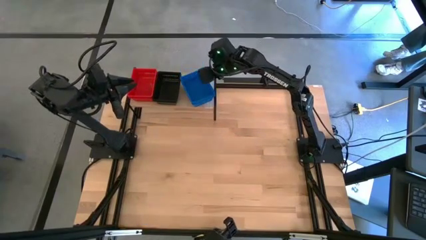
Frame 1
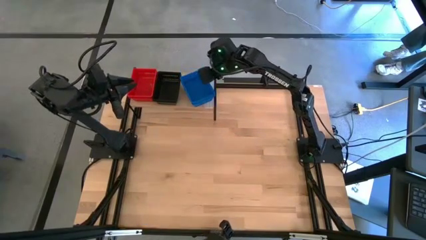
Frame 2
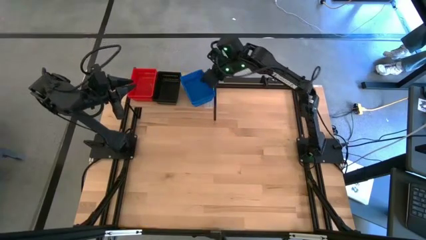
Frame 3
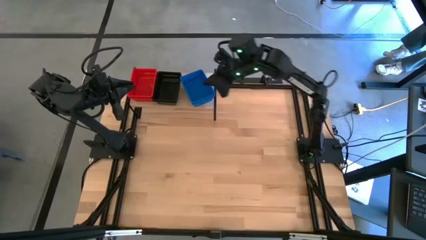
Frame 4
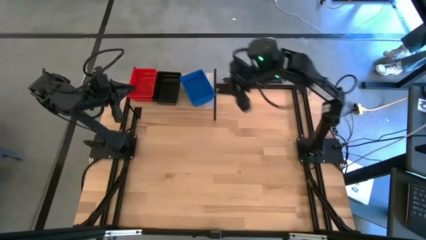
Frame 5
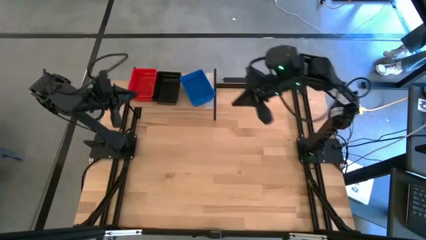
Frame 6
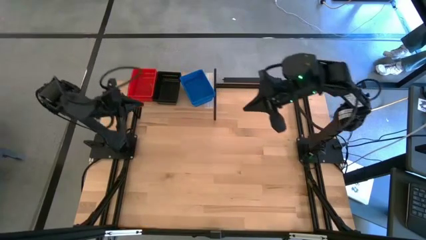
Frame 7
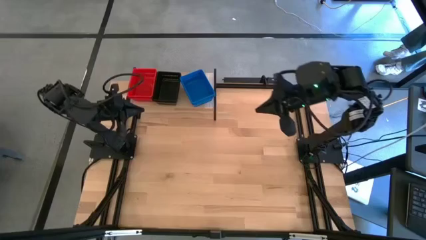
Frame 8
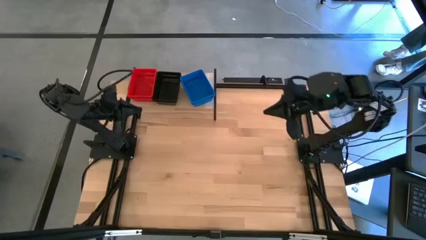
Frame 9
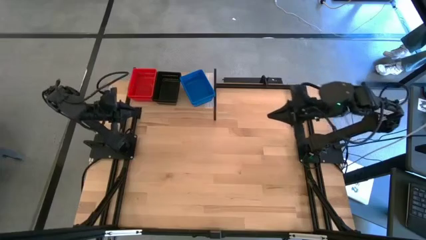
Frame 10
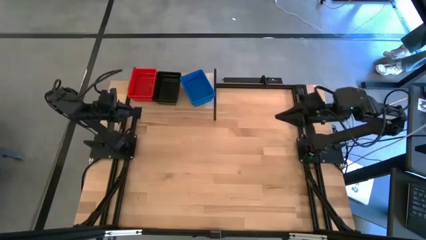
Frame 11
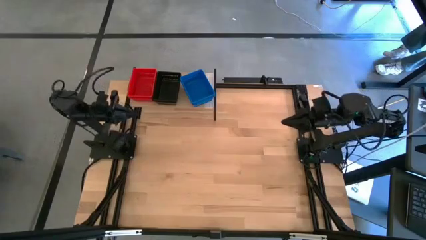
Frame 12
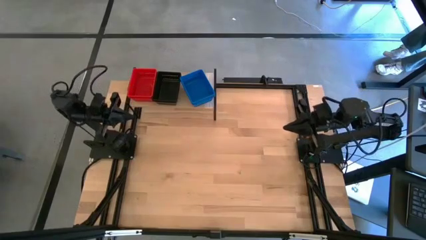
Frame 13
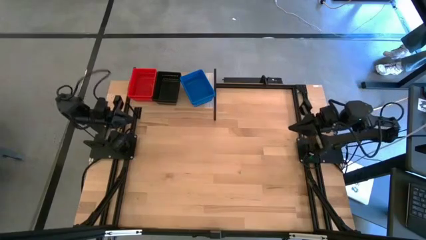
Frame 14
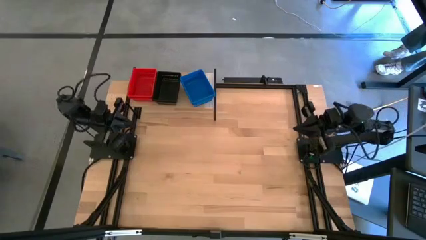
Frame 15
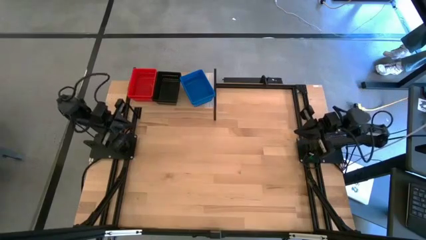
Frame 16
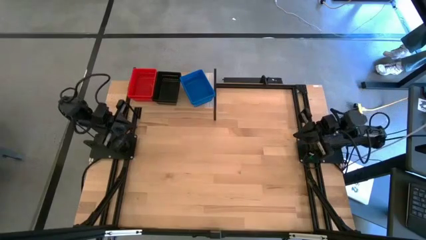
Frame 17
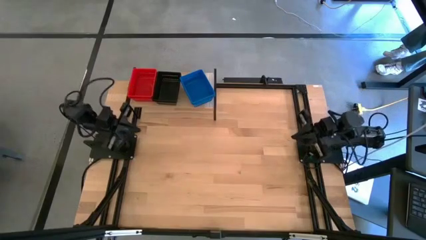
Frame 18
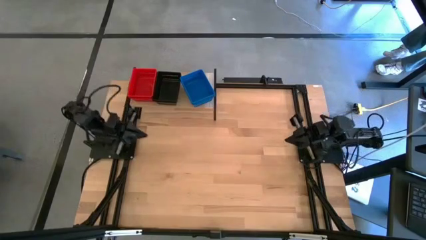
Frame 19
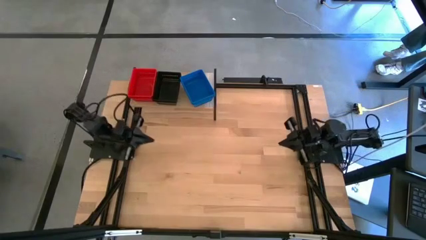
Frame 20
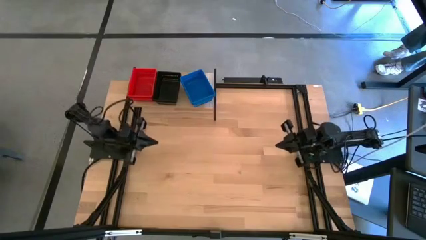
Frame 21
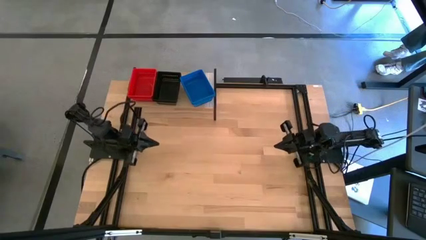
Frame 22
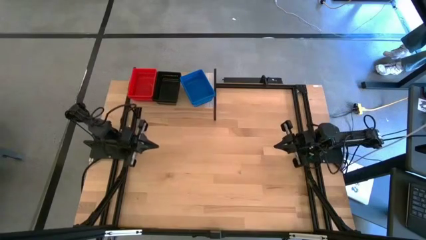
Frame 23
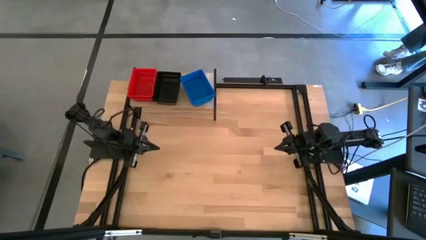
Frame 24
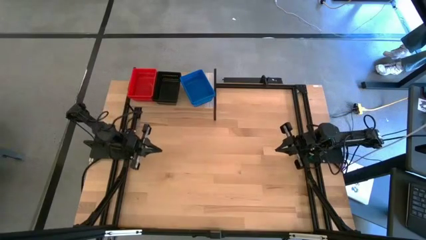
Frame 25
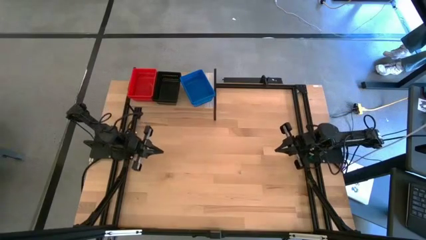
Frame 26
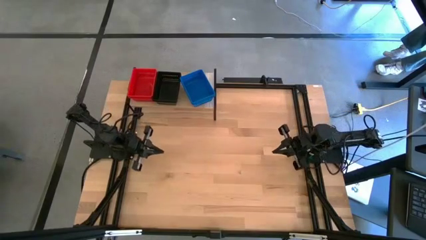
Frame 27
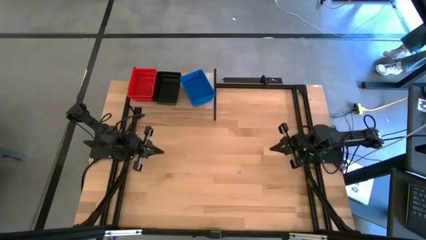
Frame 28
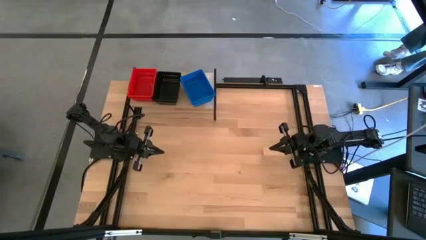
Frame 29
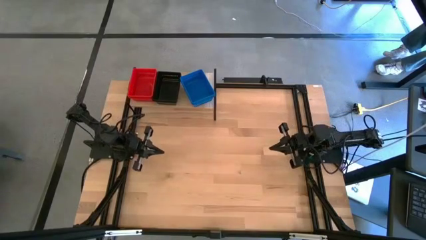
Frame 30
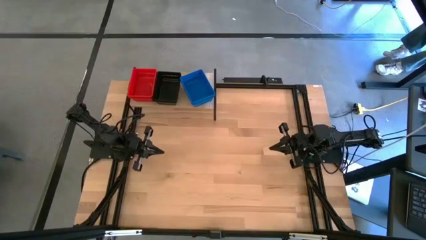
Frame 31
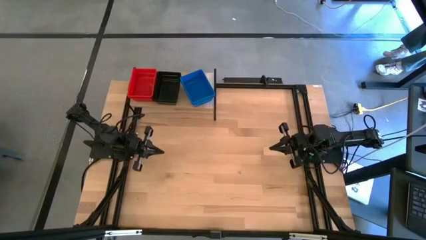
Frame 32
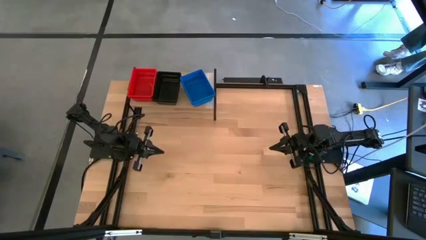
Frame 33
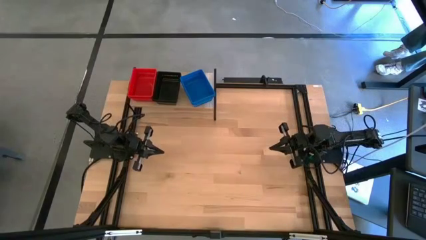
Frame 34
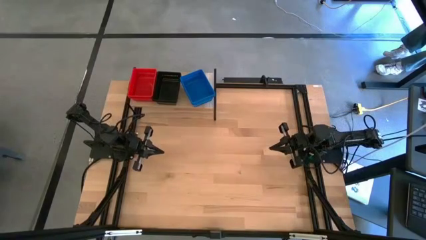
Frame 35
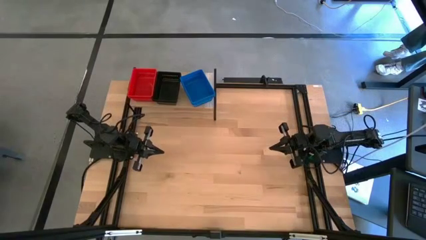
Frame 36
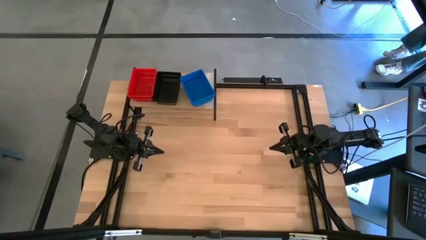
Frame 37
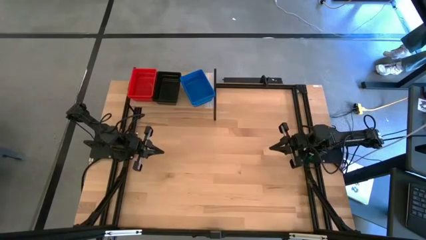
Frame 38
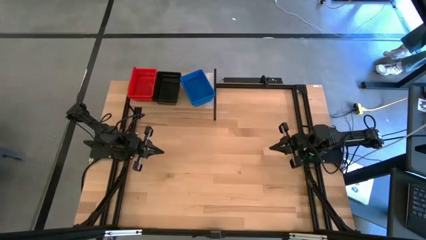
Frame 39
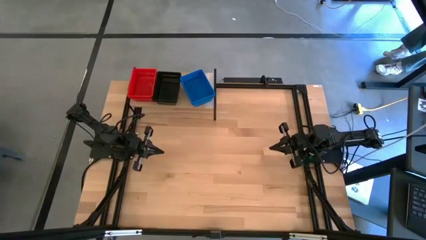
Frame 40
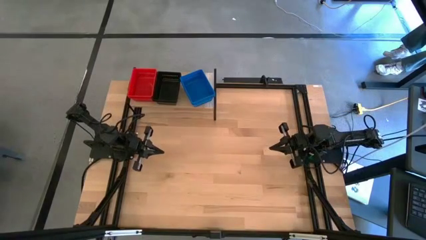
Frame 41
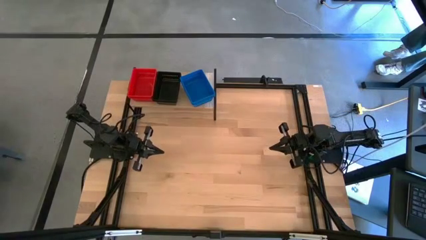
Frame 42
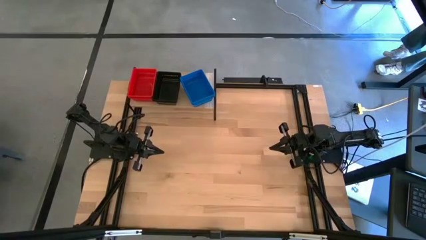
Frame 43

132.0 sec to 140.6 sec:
Task: Stack baskets on shelf by color
Return to Home Position

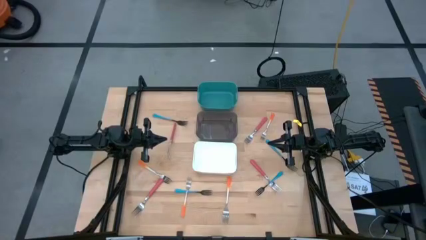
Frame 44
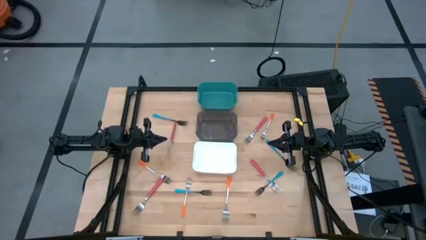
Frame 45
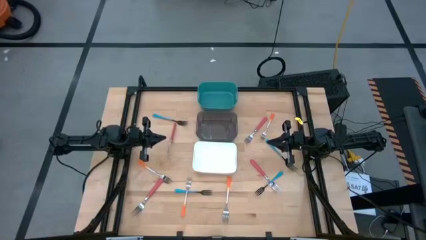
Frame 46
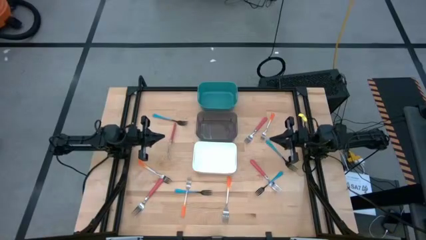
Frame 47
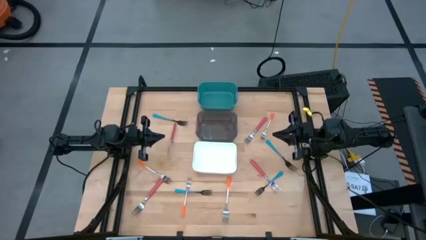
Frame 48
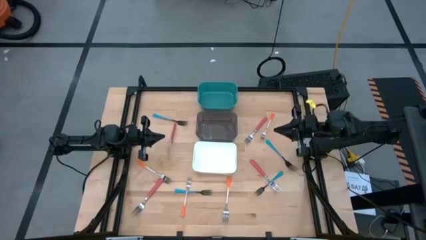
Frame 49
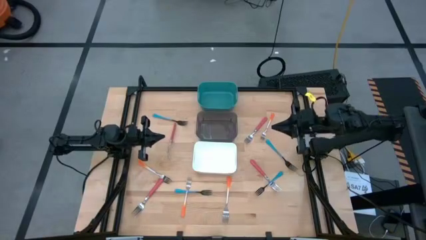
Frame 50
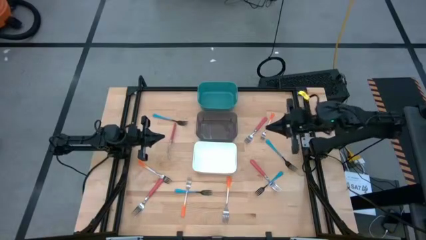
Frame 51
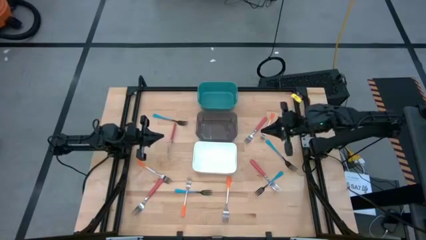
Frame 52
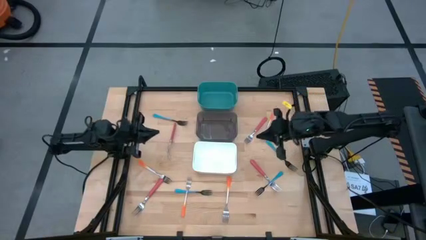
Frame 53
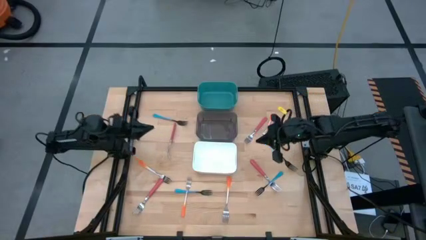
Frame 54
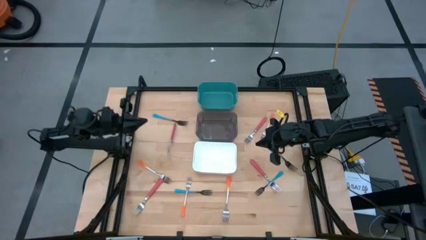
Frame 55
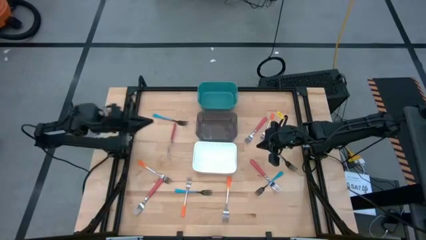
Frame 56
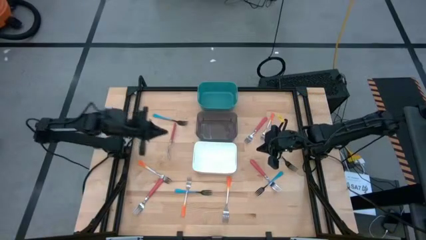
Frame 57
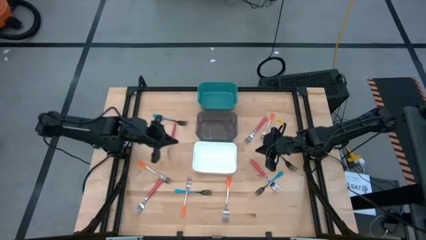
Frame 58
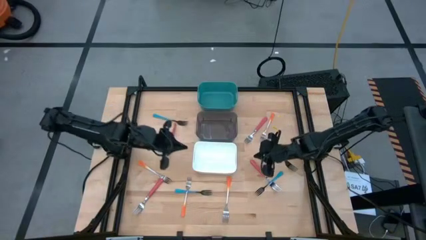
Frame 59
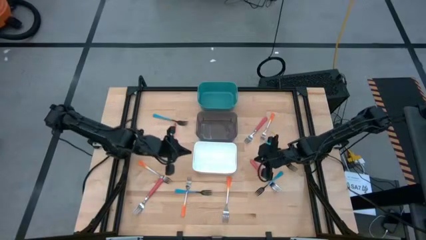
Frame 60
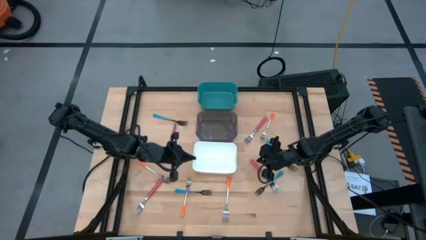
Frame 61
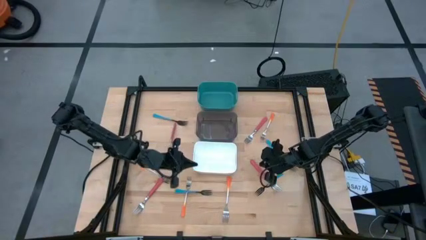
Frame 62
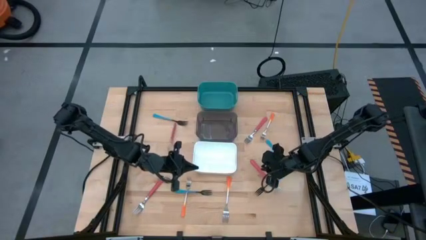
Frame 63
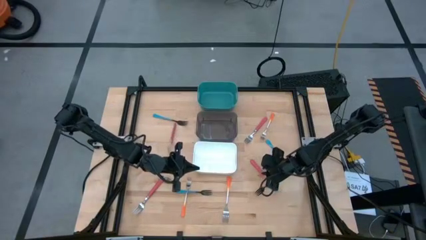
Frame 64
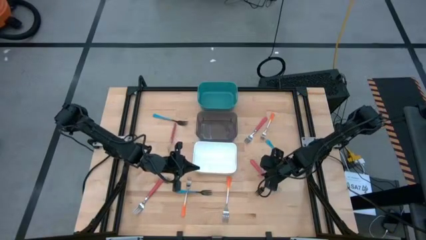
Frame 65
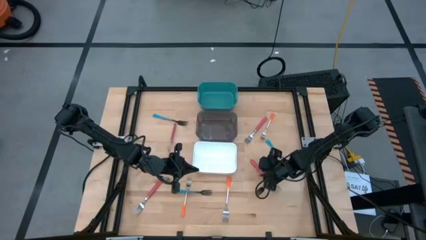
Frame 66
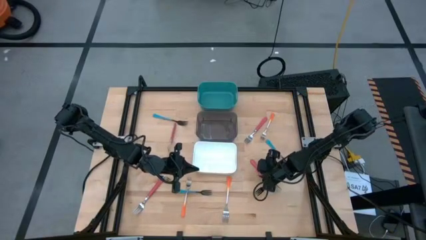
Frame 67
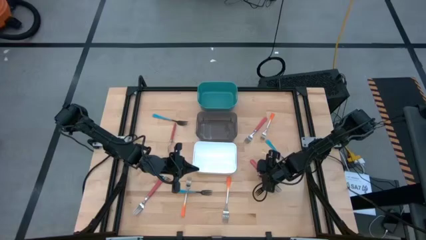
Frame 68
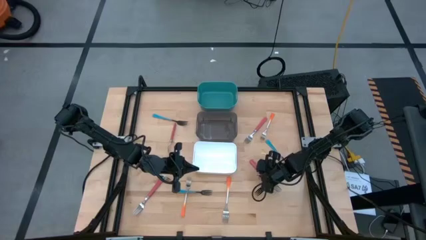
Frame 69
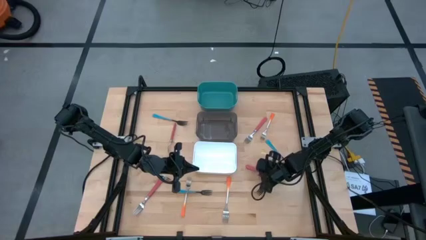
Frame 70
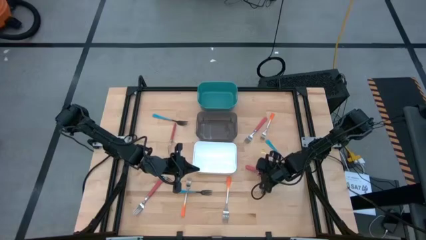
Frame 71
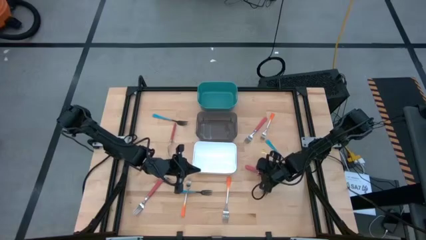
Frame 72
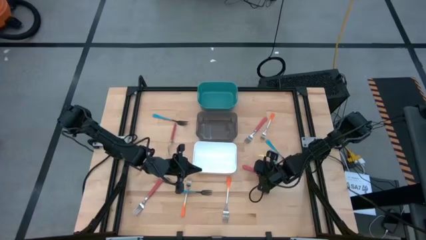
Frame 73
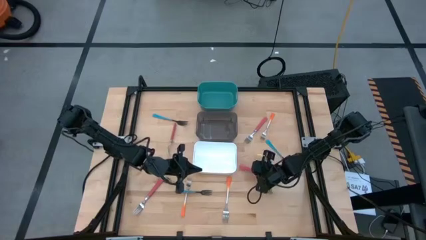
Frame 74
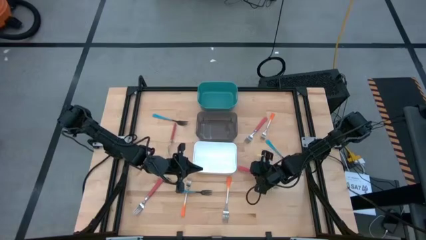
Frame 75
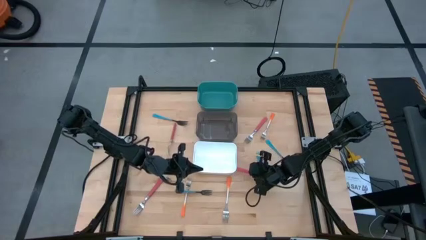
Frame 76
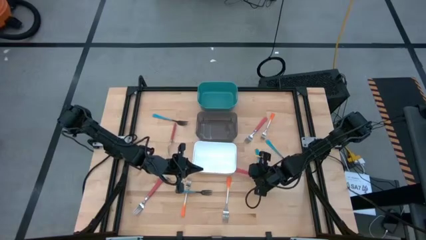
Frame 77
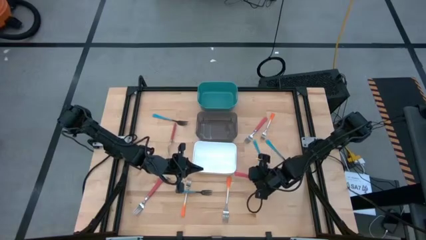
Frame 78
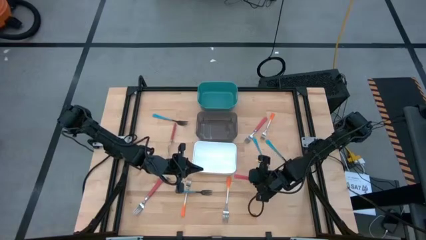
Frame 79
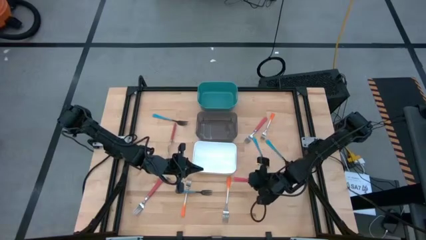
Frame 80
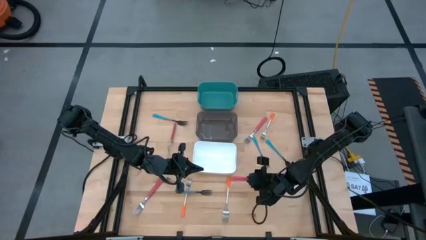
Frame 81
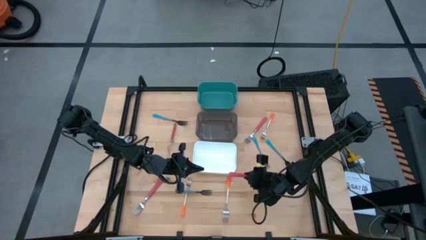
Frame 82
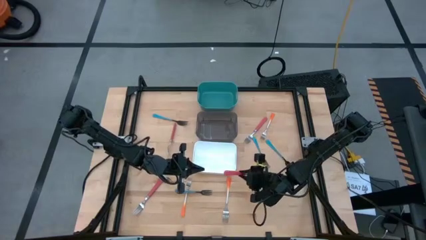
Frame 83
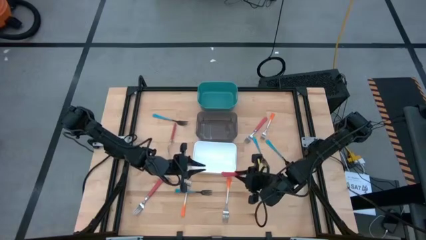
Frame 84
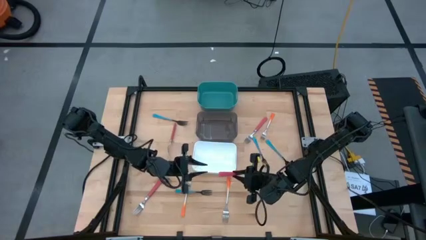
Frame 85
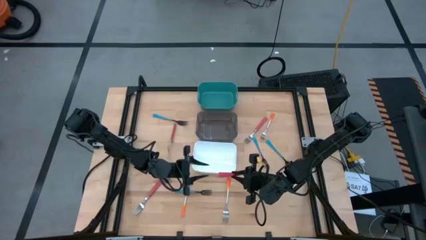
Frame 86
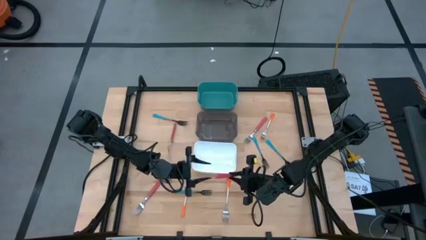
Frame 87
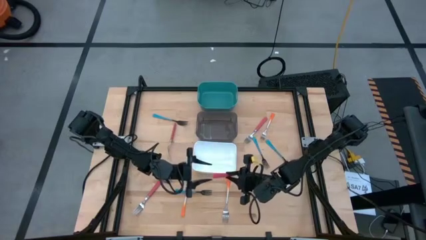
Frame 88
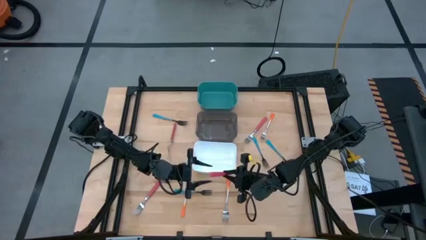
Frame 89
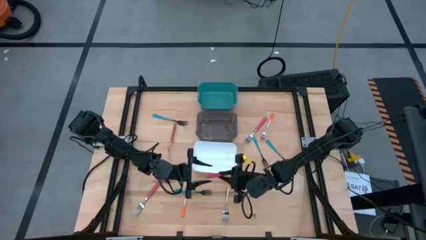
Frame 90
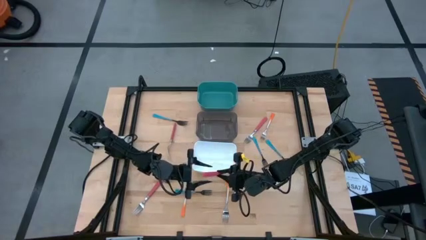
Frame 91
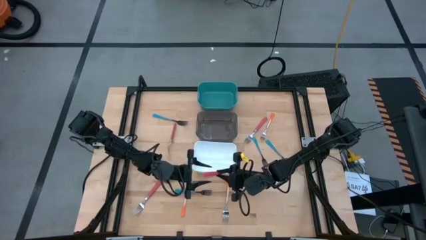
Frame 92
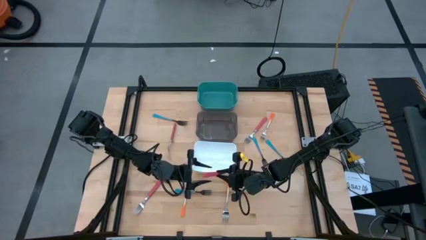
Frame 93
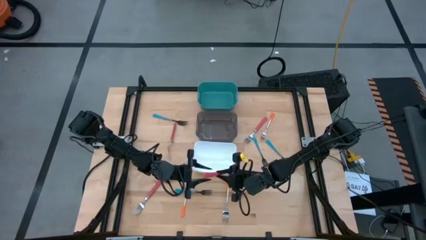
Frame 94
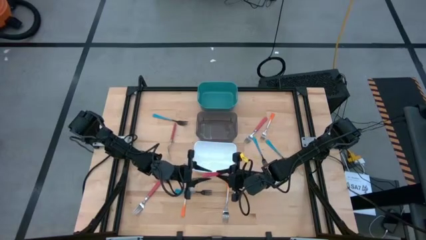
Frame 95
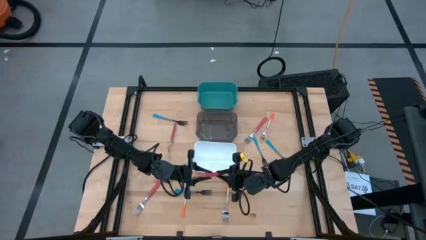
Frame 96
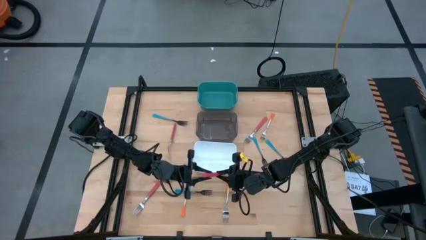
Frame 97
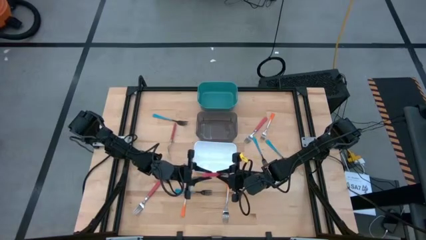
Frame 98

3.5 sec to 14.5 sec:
Task: Sort silverware by color (type)
Put the bottom right pink fork into the black bin
